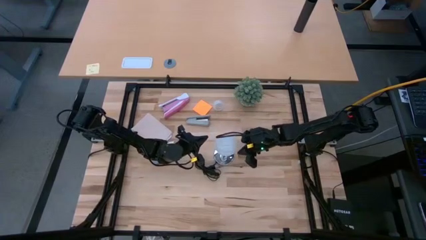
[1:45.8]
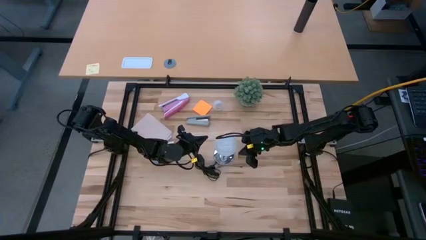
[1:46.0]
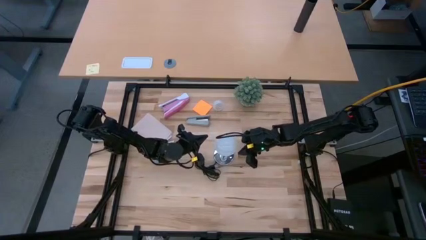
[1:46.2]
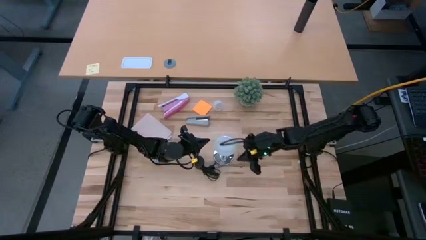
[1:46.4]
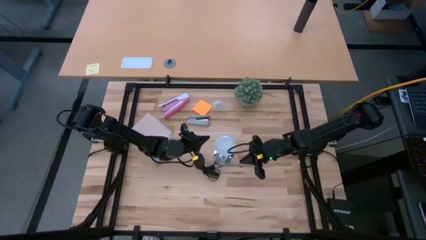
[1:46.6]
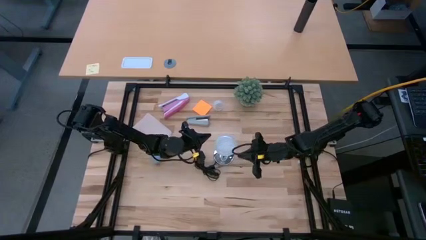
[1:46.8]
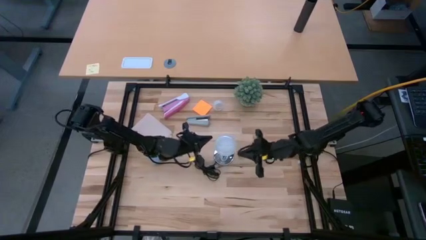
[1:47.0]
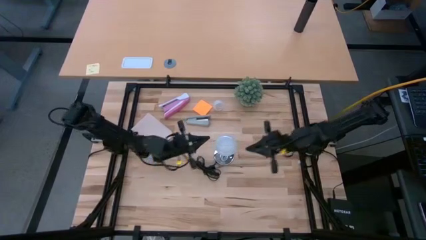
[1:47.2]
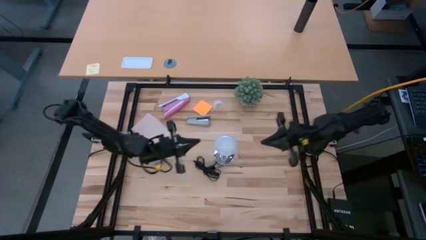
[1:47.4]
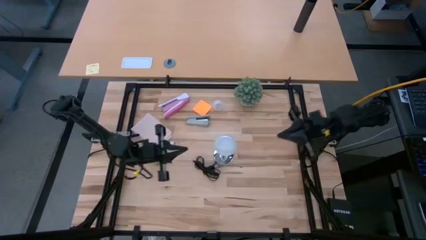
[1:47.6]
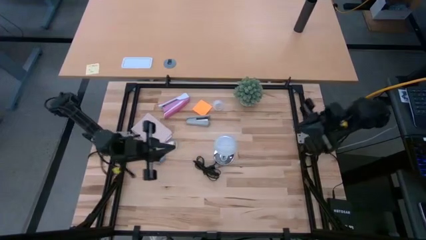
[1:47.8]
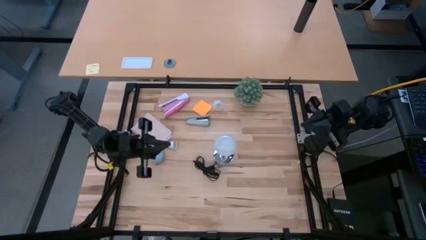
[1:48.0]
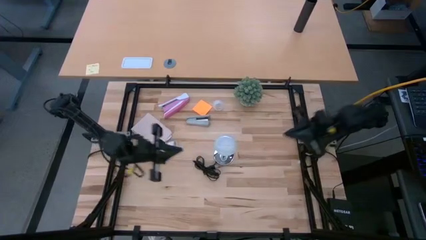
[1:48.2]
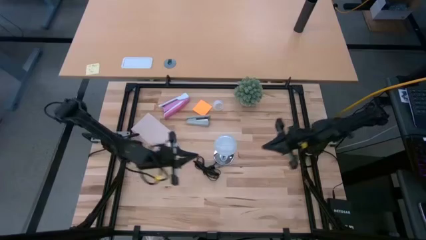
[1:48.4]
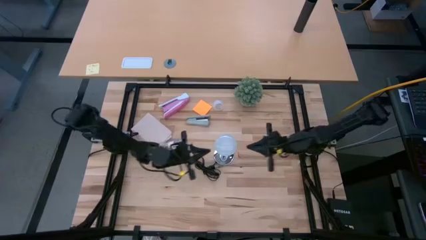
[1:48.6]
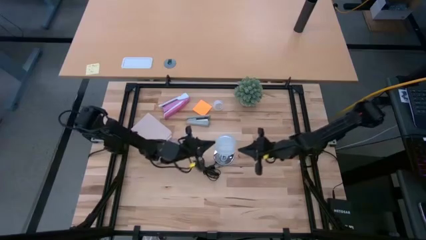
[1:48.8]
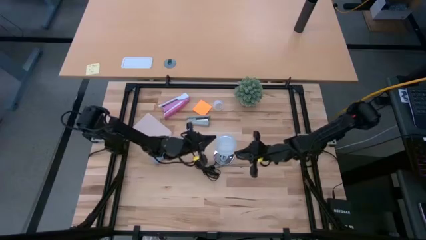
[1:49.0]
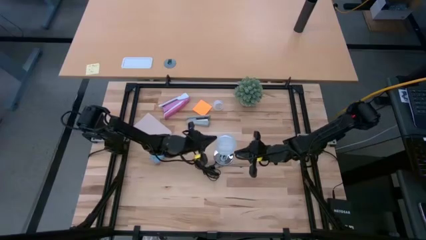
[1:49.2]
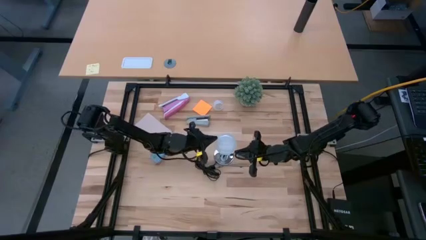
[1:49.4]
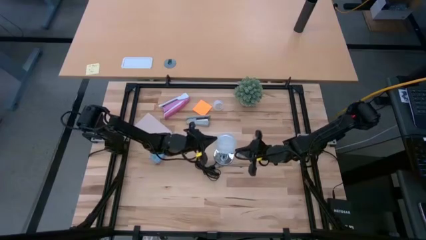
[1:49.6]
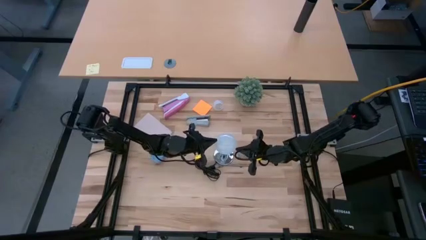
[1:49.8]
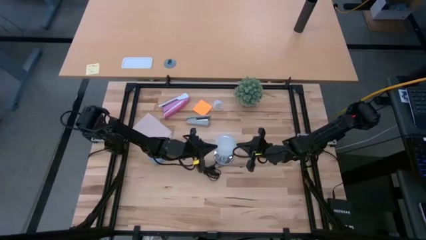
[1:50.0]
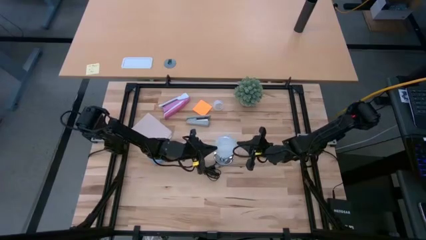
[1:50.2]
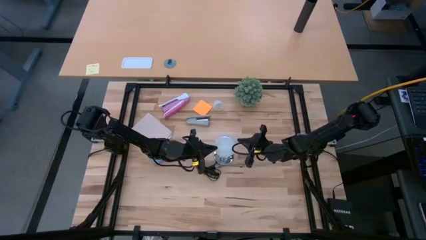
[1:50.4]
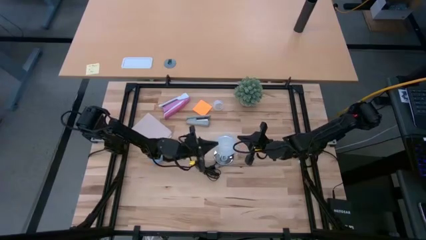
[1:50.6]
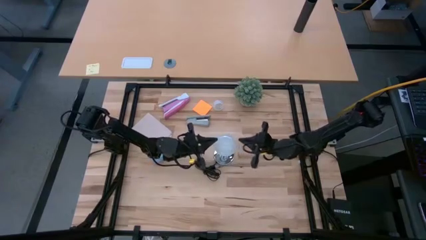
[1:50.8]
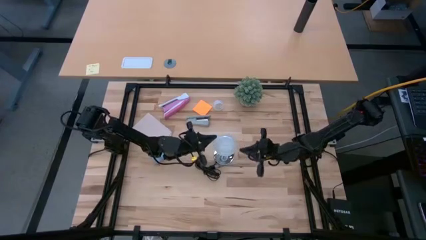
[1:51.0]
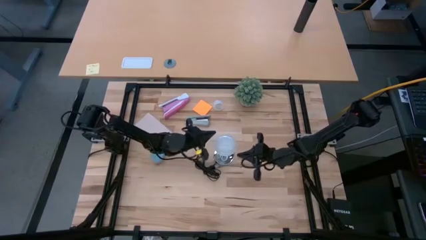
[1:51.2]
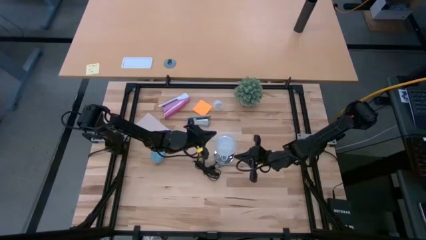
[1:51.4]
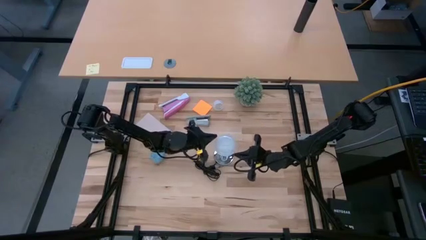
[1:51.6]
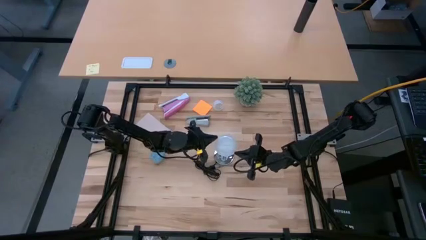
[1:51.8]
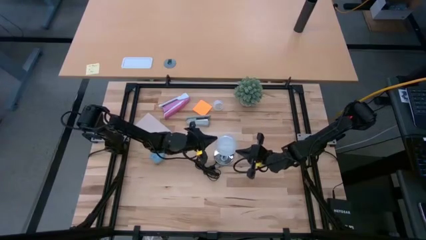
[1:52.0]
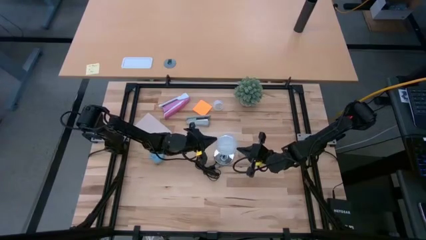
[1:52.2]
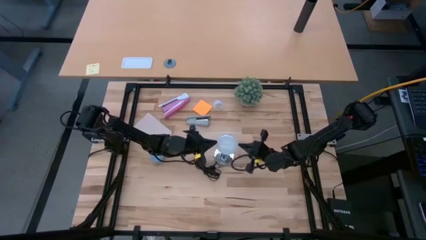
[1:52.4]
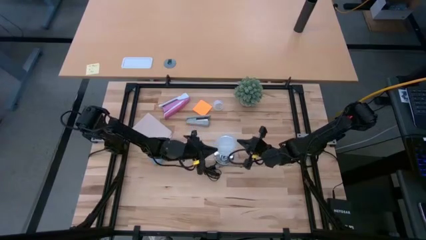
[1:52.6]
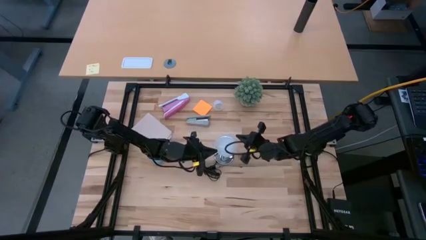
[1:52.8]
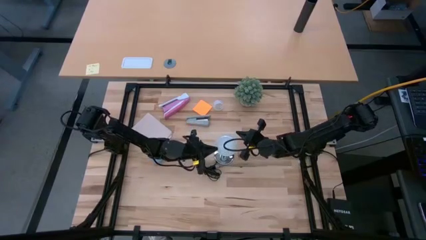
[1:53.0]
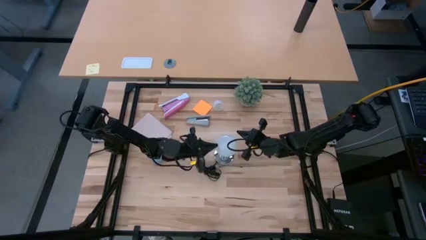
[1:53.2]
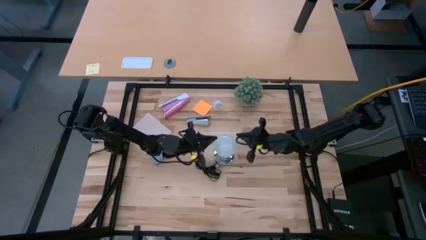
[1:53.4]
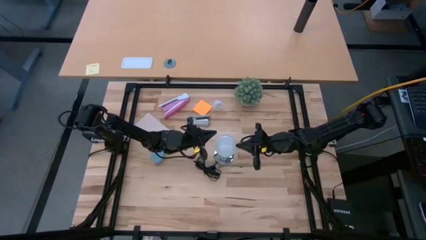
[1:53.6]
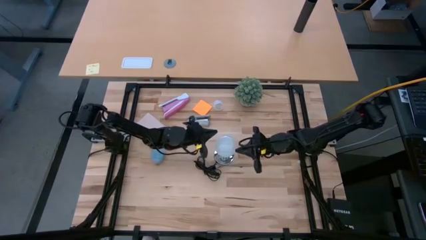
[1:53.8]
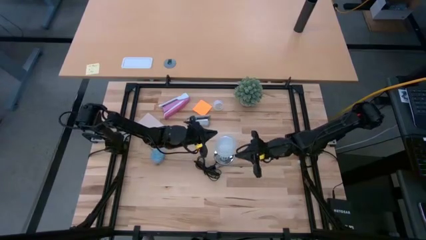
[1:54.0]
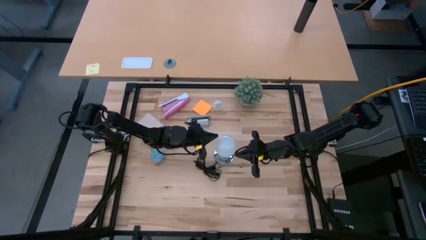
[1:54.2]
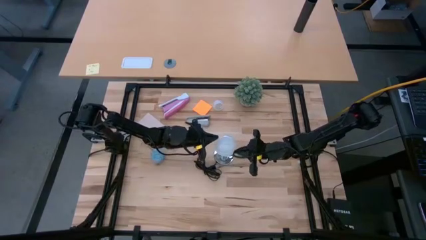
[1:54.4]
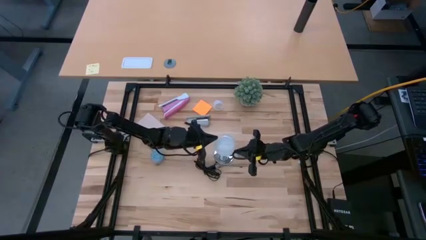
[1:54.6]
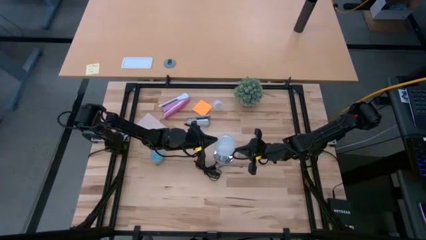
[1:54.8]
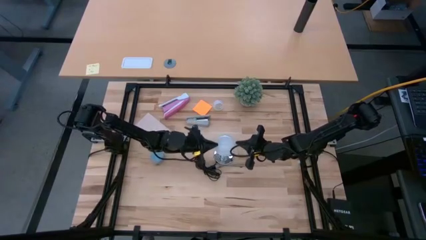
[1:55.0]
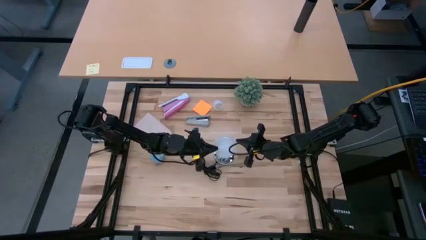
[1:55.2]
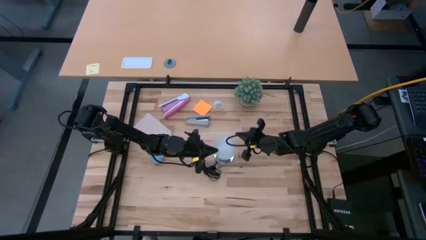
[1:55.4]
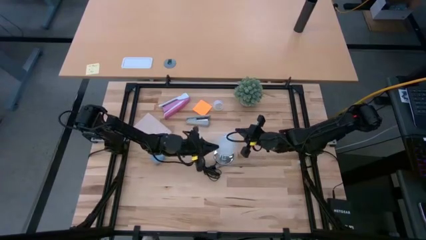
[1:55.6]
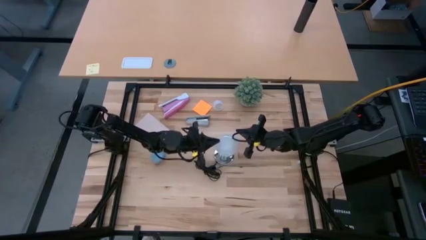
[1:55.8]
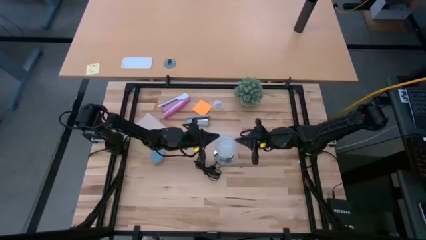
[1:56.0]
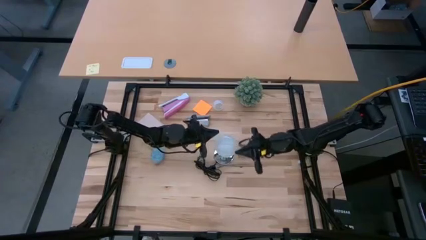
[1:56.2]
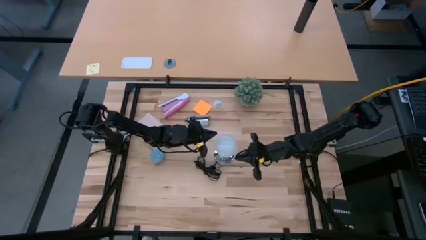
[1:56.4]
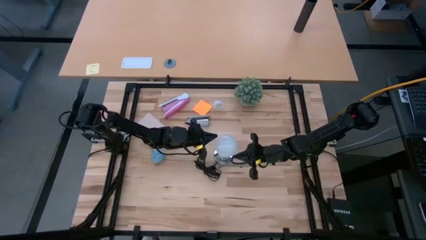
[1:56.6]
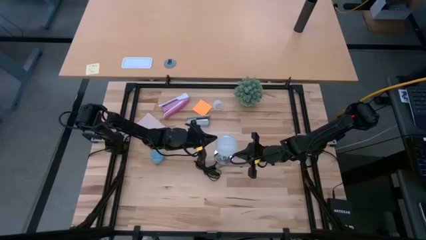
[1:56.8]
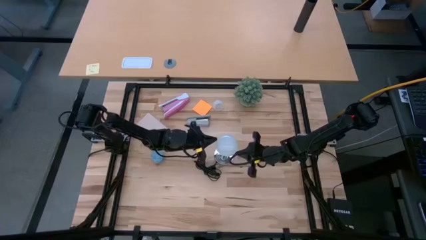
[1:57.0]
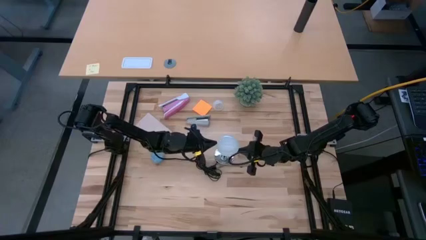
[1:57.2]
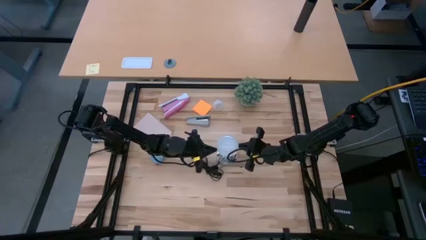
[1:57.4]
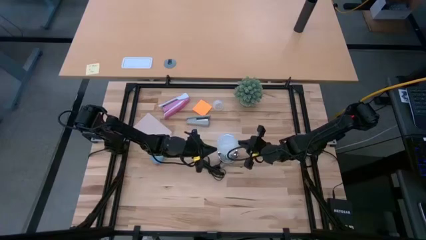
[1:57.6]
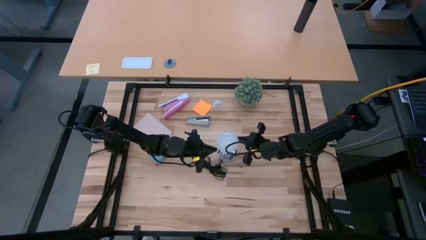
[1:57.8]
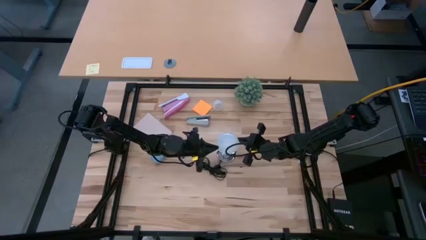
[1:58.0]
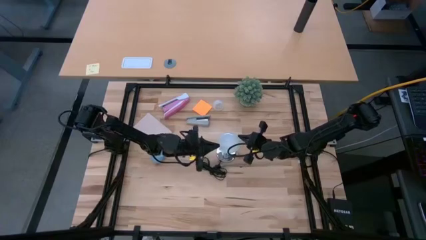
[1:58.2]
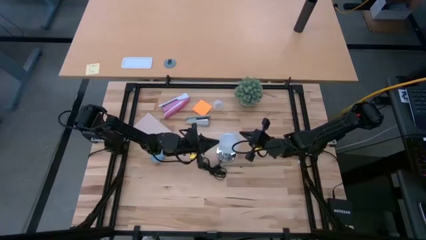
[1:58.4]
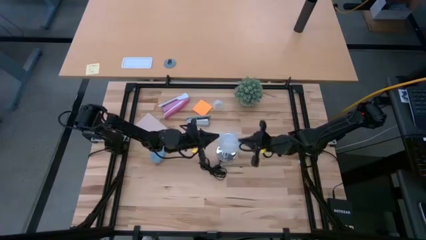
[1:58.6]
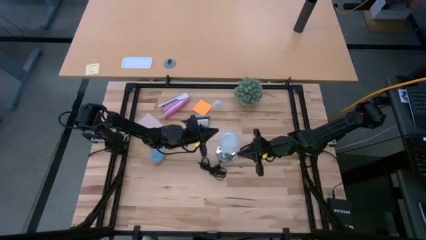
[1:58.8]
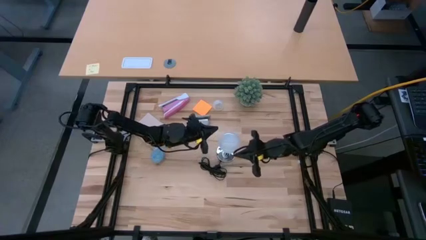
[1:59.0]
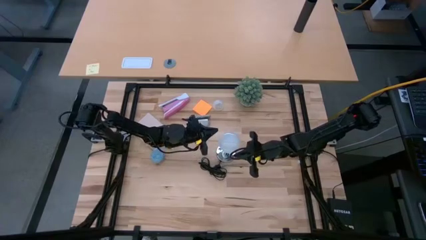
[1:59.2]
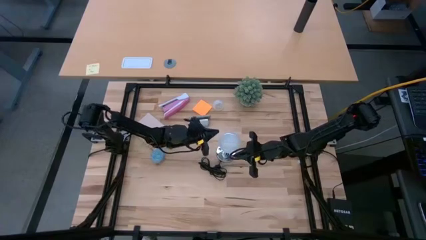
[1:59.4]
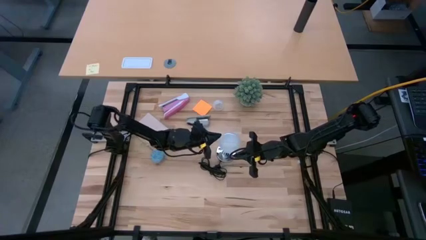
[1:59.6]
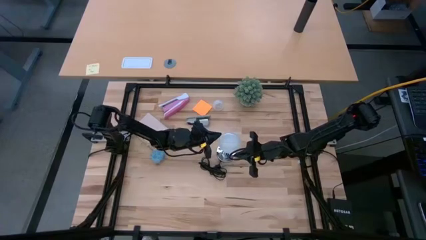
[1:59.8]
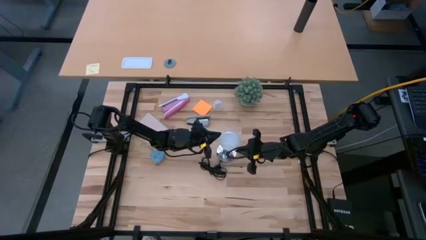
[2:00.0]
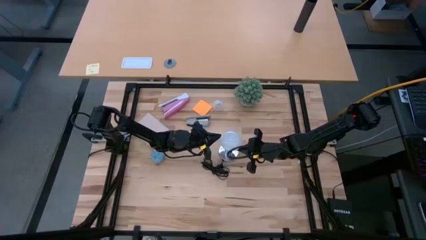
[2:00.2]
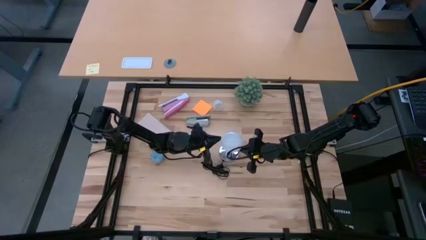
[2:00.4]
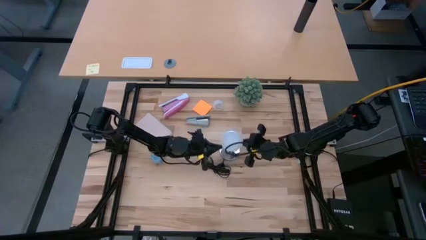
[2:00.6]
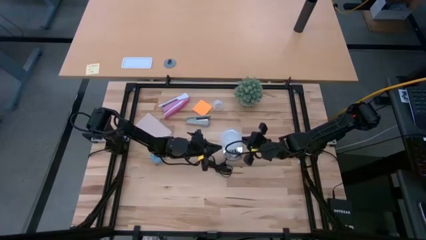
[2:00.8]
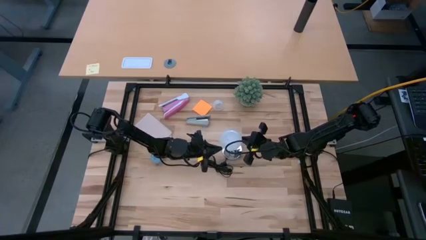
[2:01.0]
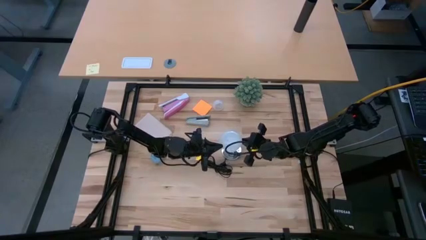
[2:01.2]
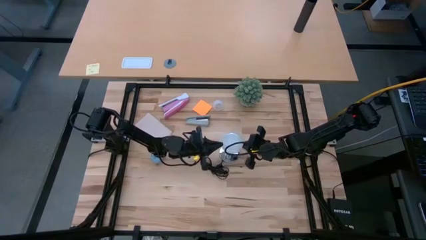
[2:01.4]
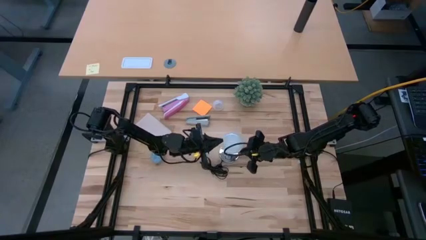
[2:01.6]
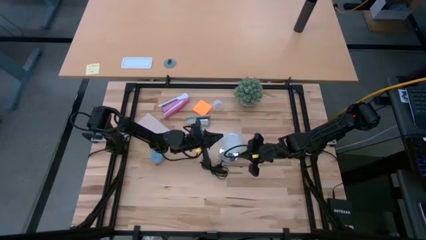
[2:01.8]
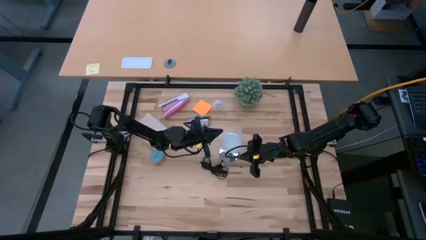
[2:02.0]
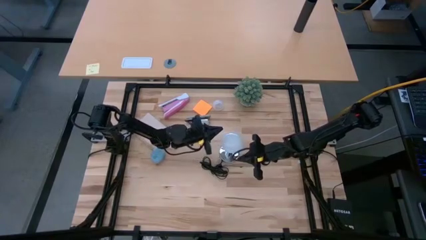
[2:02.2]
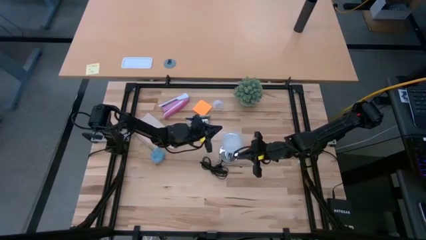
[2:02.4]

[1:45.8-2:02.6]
Task: Screw lightbulb
Remove the lightbulb from the lamp

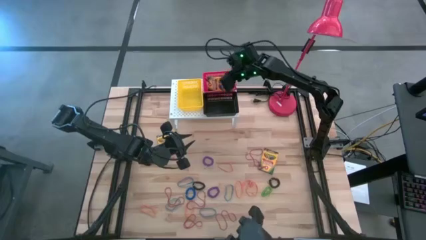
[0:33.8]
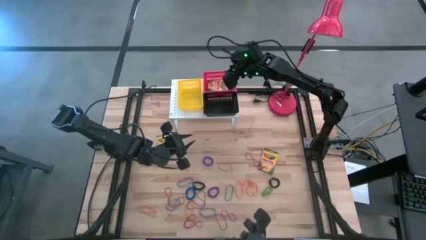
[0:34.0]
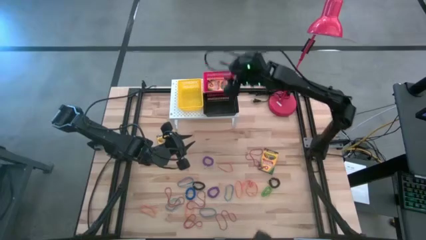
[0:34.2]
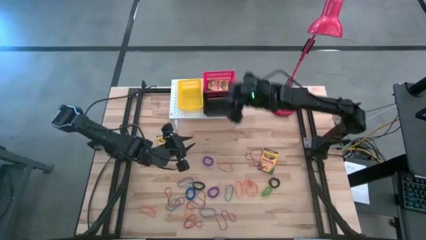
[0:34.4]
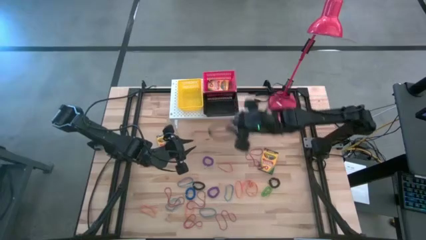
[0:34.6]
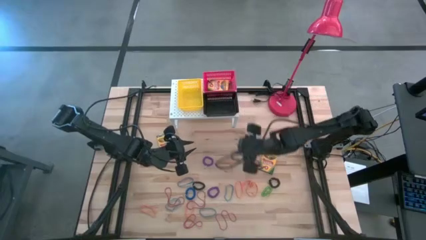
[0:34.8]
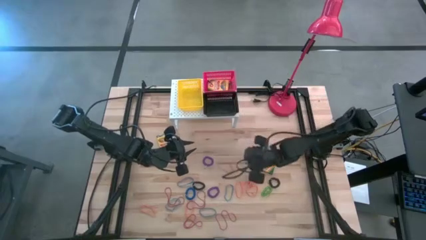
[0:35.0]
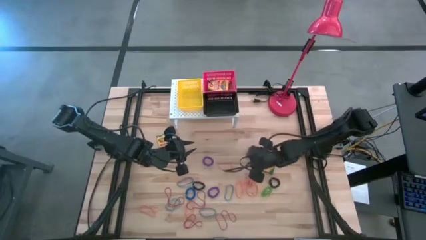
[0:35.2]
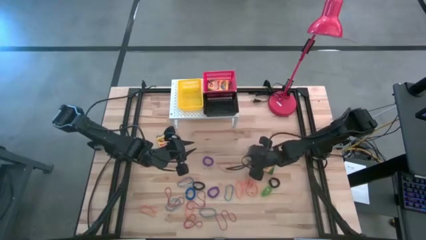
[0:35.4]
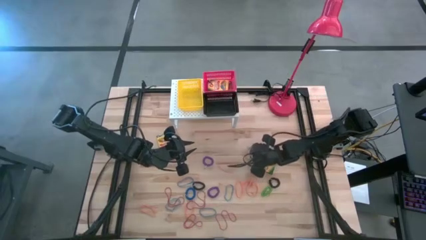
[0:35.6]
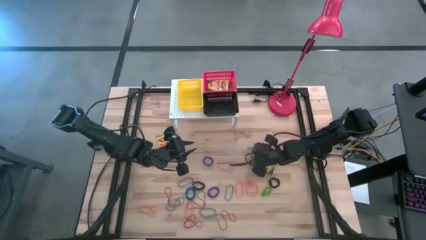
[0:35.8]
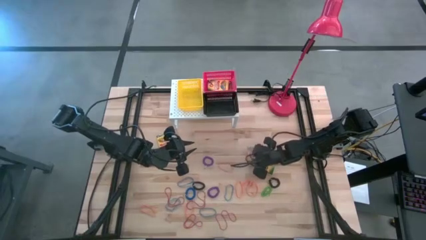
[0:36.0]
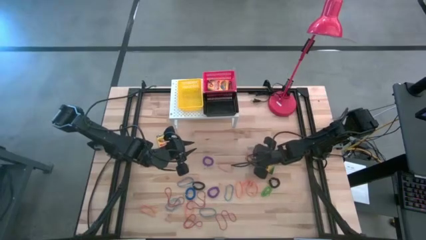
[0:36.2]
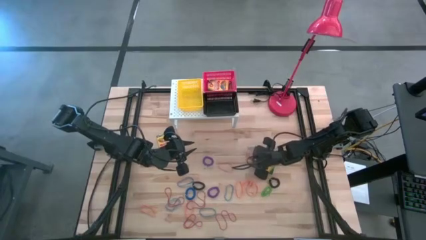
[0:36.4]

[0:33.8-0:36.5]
Task: Pick & Place Office Desk Supplies
Put the red rubber band into the black bin on the shelf
